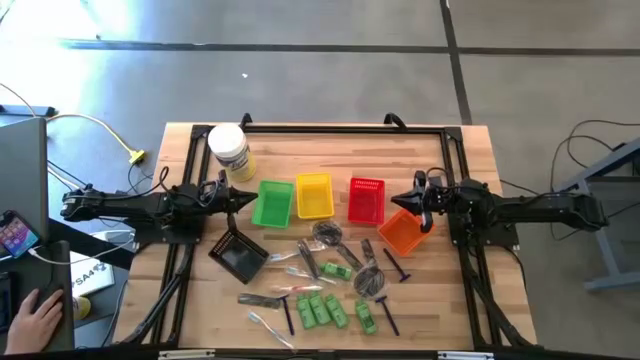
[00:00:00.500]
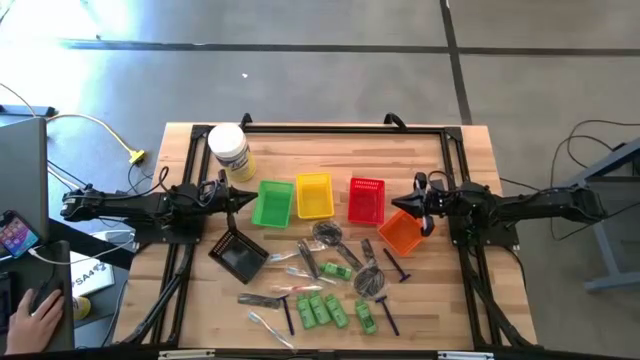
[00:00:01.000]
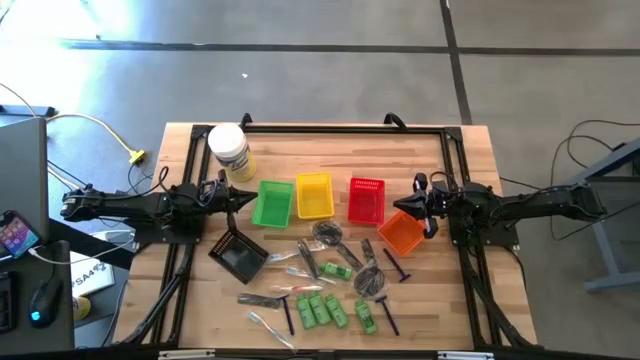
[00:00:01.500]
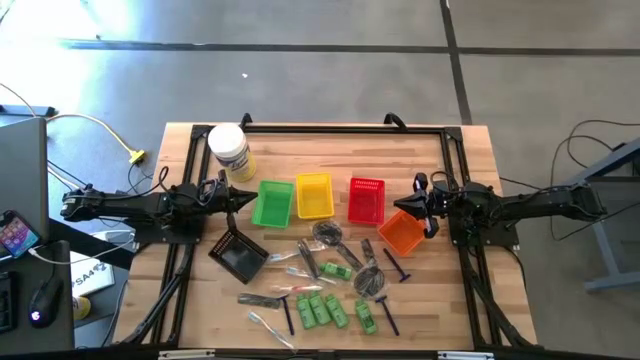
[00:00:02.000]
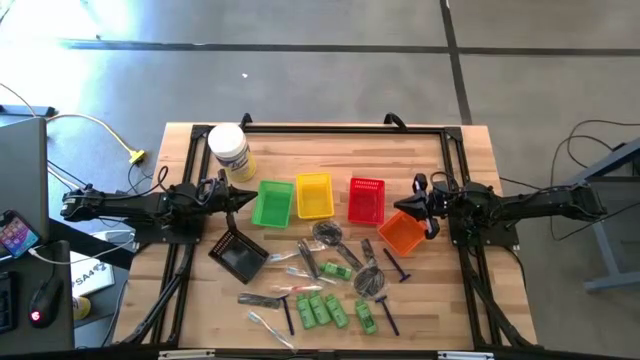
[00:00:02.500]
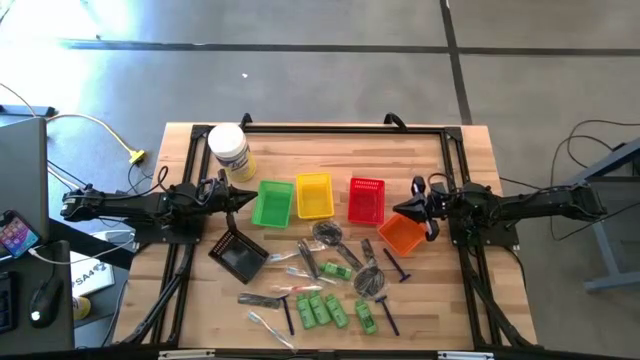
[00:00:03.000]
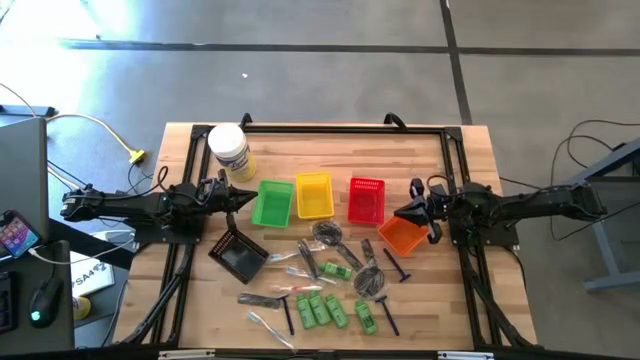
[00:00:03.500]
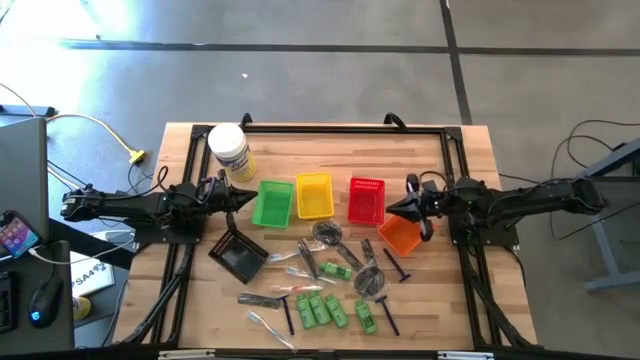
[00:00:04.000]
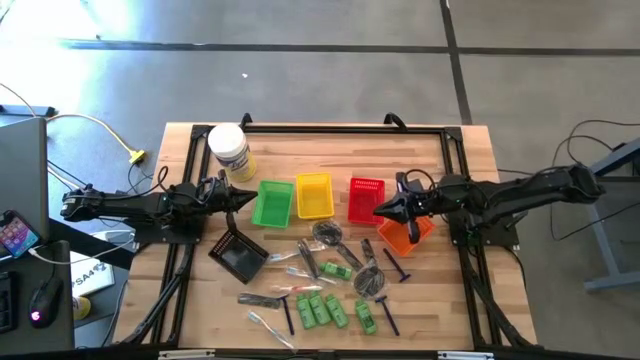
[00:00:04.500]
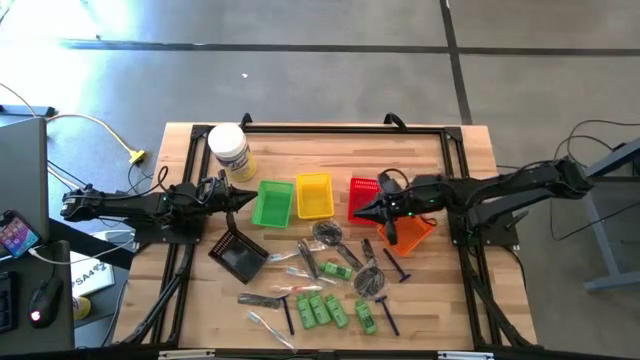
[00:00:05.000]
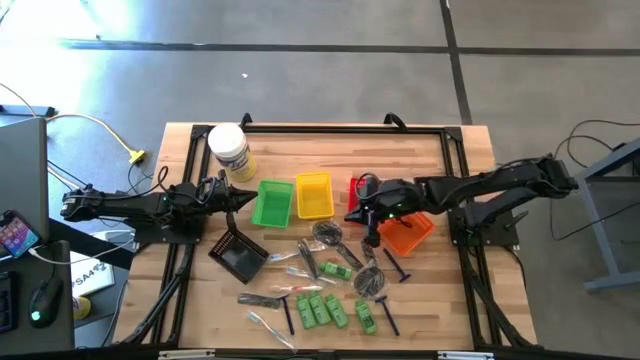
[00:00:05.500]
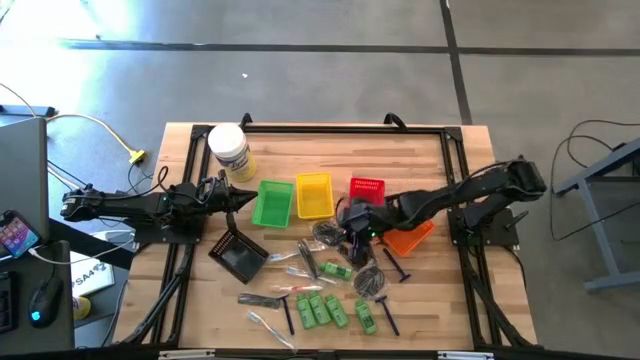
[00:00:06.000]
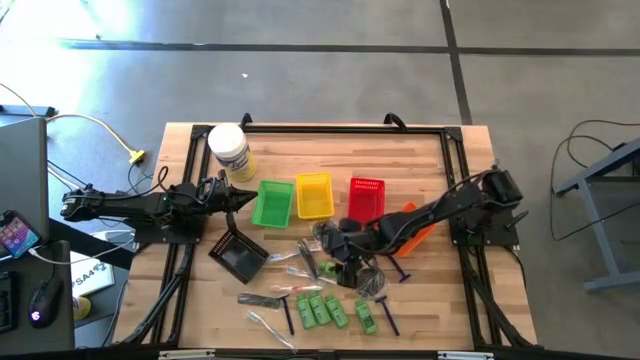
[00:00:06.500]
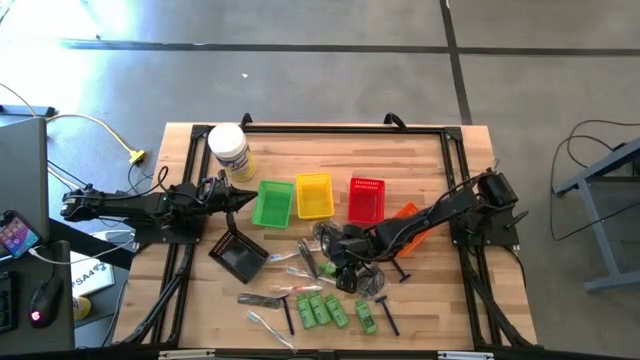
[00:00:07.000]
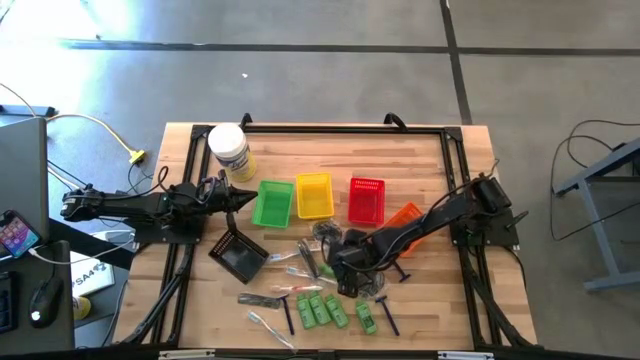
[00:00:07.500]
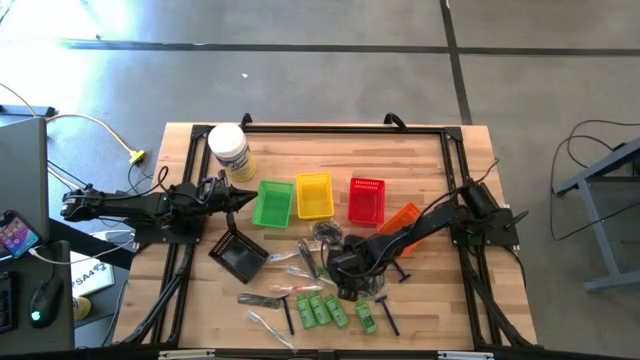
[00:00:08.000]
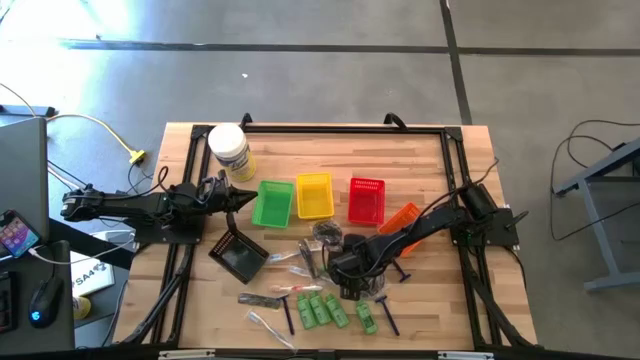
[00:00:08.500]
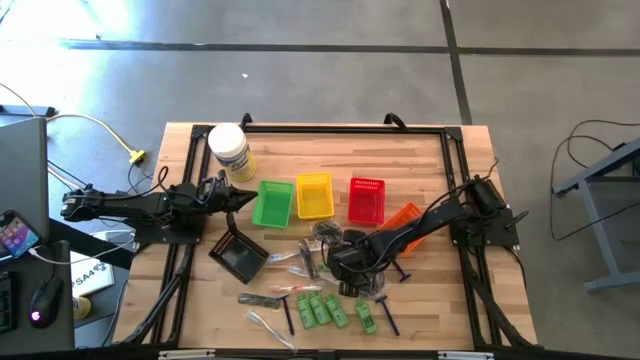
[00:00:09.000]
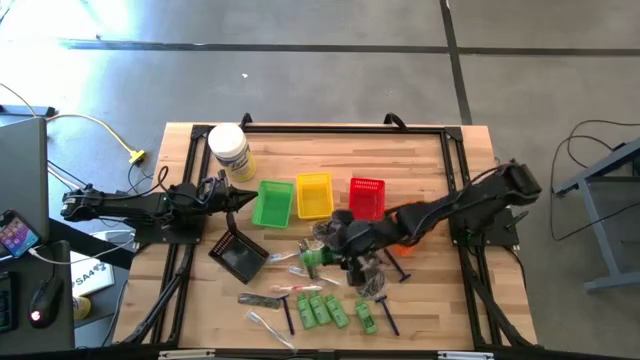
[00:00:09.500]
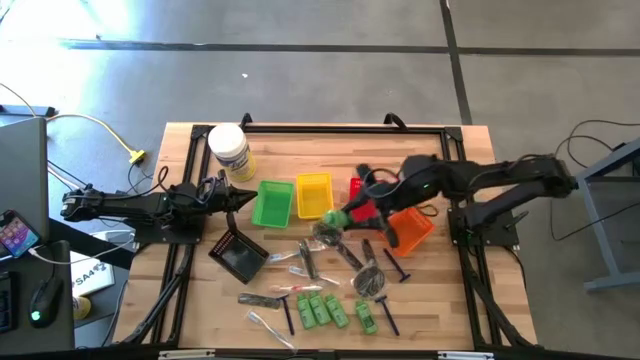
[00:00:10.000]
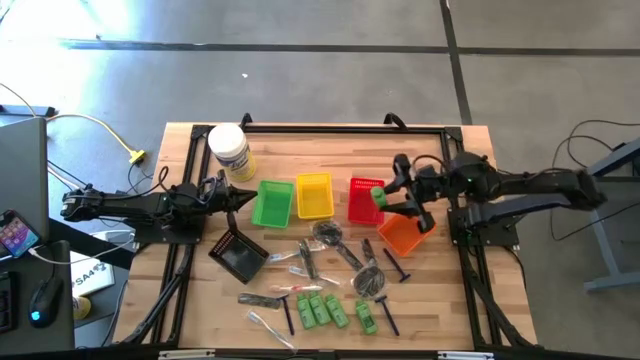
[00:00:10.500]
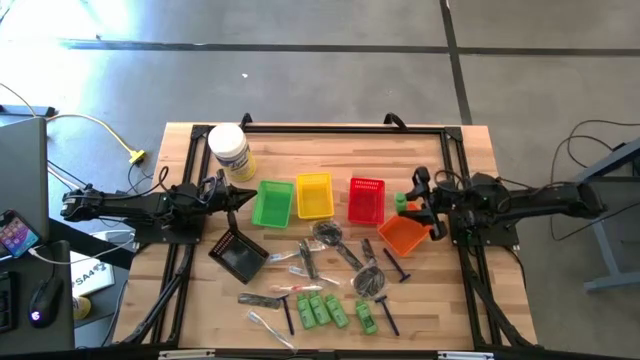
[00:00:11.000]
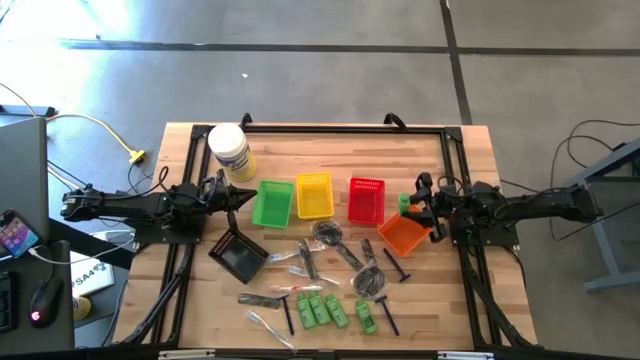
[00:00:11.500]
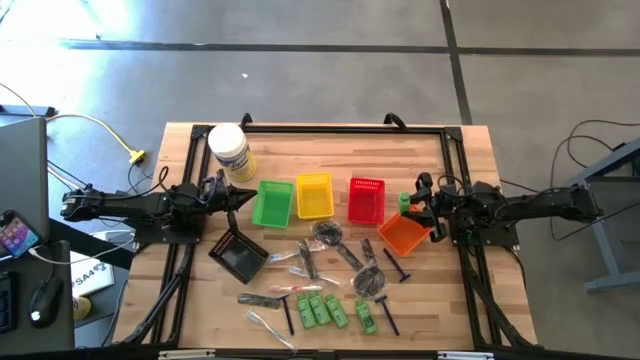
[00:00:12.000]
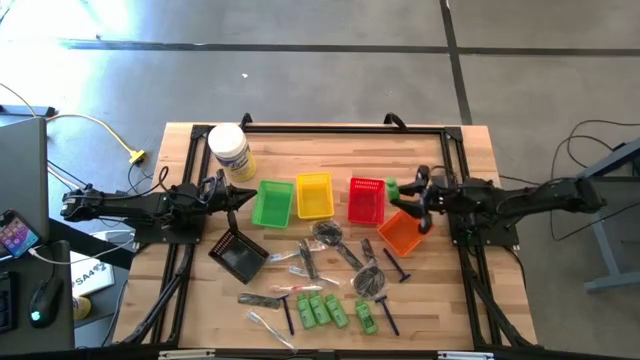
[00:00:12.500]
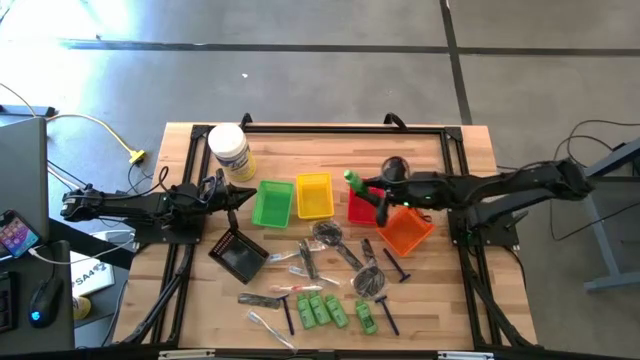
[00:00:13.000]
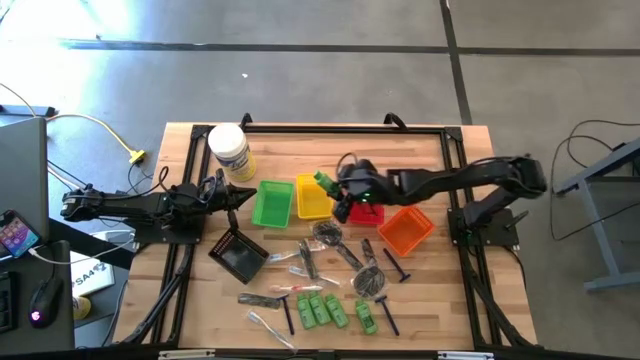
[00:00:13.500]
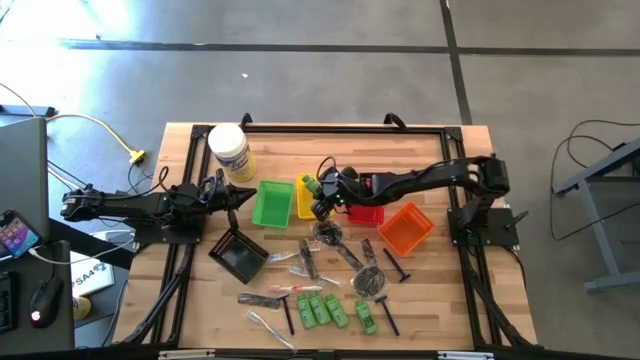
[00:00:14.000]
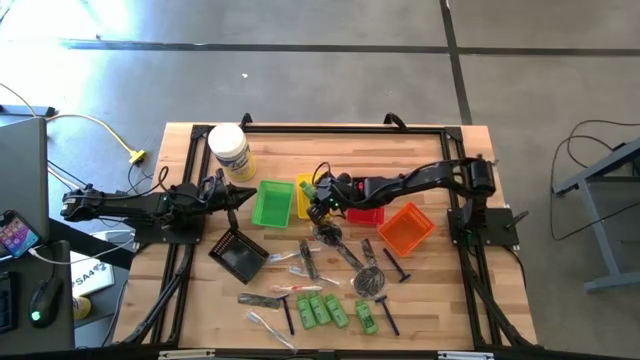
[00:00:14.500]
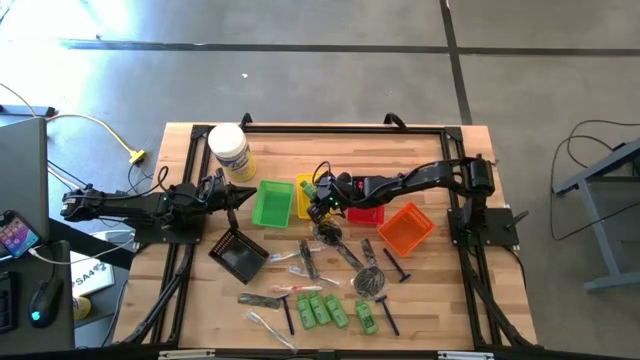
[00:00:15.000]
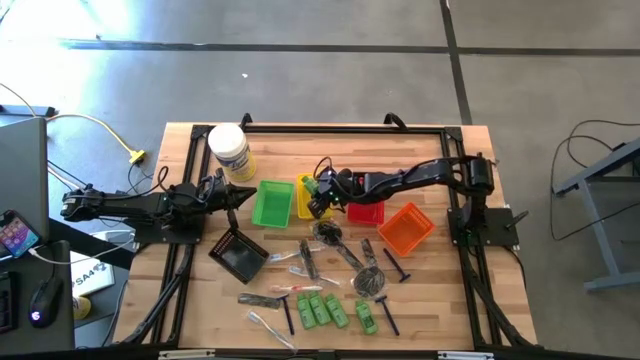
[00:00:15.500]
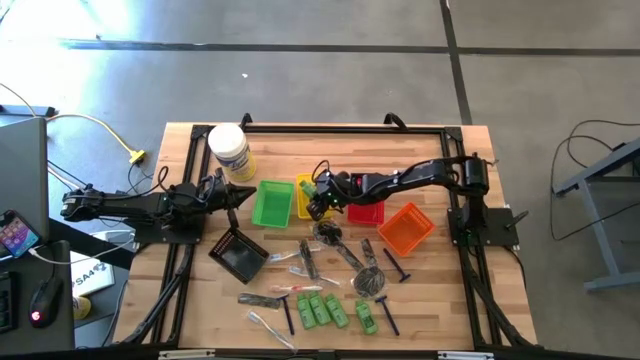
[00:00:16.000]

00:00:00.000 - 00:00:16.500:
Task: Pick & Place Travel size toiletries
Put the green shampoo into yellow basket
